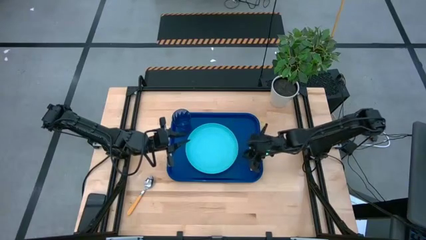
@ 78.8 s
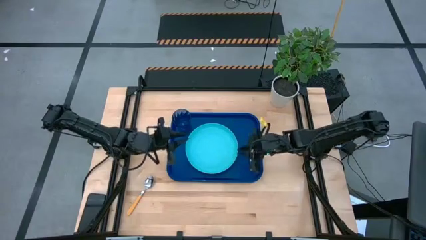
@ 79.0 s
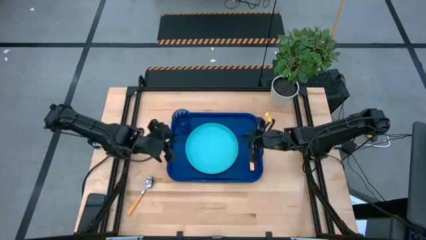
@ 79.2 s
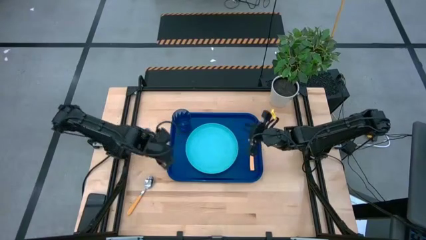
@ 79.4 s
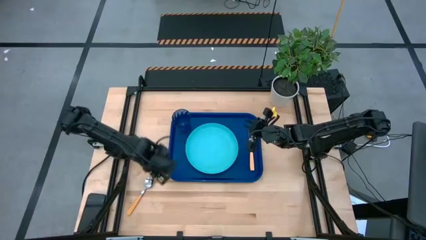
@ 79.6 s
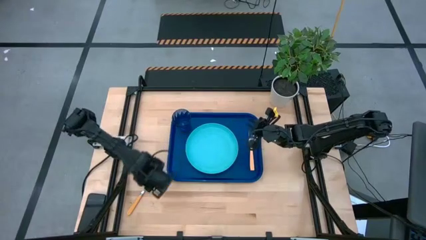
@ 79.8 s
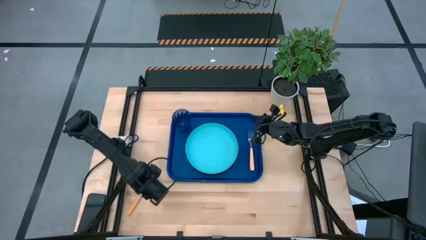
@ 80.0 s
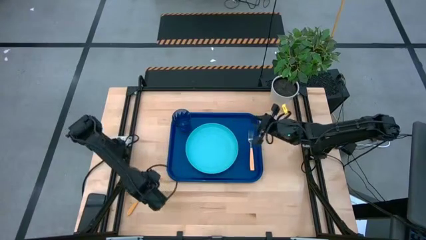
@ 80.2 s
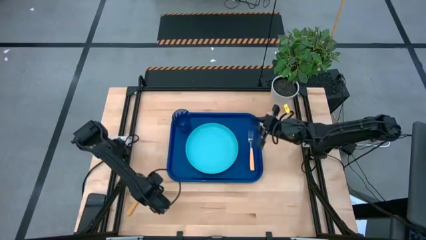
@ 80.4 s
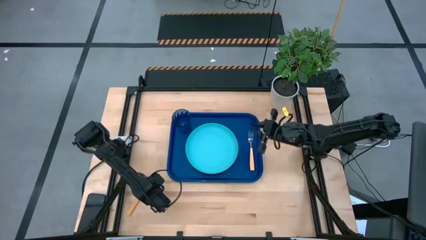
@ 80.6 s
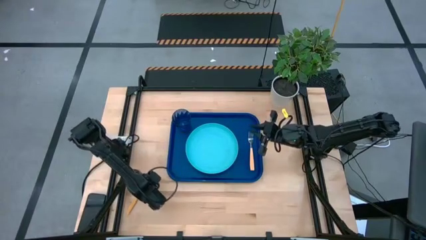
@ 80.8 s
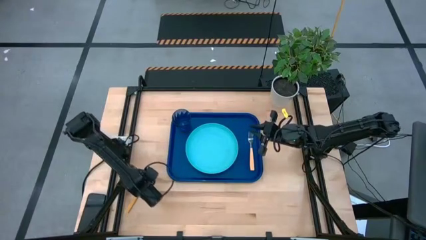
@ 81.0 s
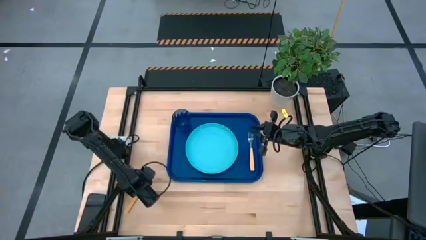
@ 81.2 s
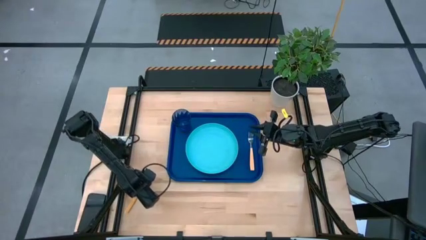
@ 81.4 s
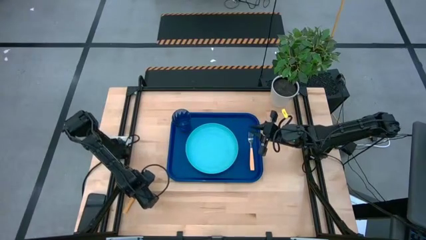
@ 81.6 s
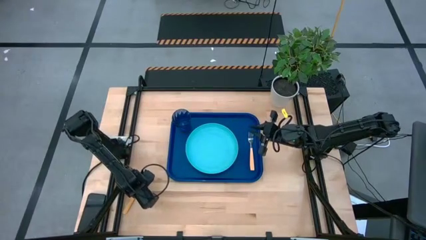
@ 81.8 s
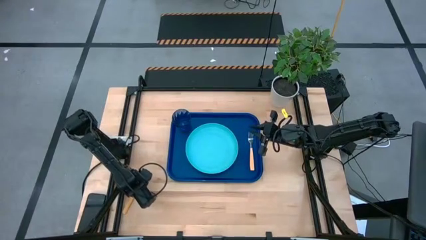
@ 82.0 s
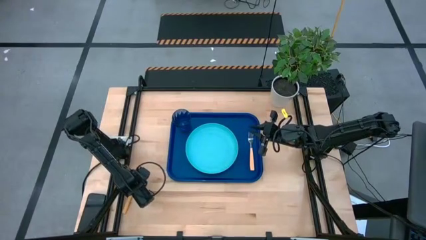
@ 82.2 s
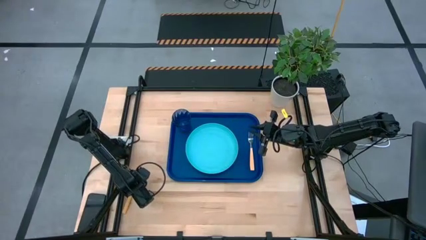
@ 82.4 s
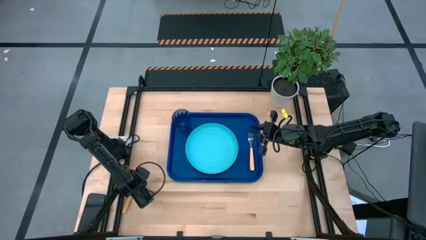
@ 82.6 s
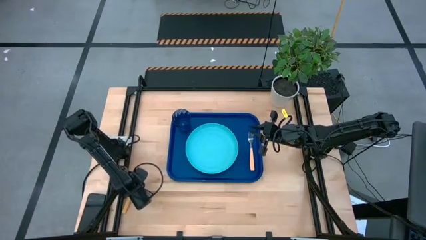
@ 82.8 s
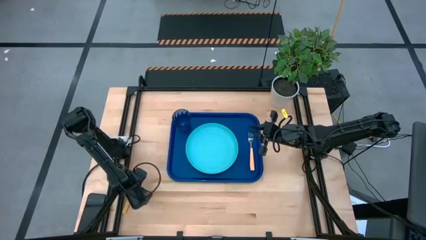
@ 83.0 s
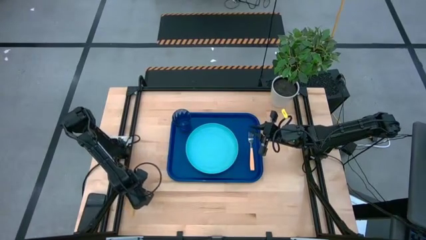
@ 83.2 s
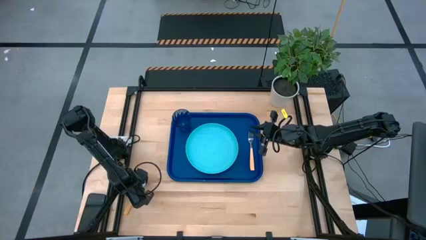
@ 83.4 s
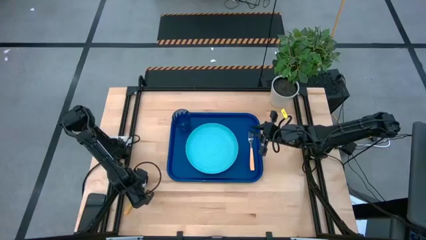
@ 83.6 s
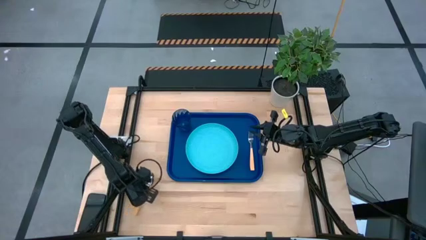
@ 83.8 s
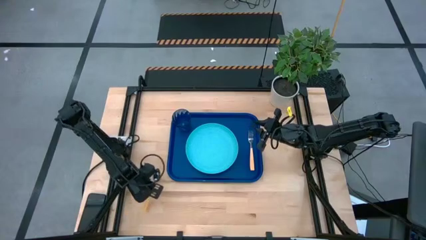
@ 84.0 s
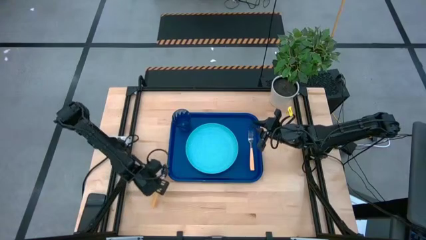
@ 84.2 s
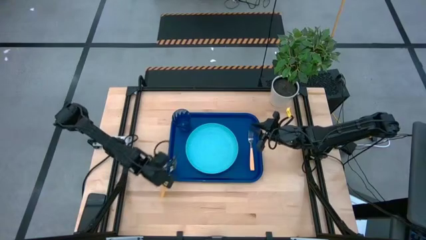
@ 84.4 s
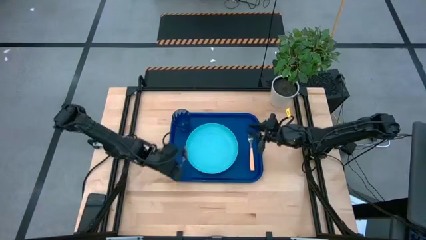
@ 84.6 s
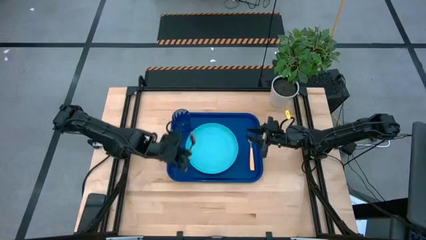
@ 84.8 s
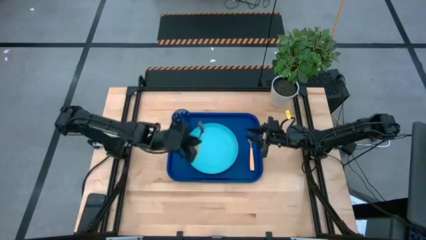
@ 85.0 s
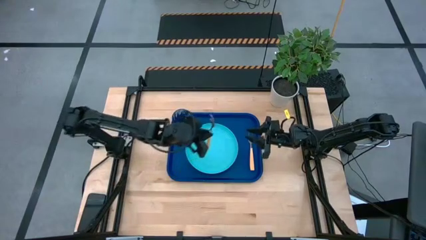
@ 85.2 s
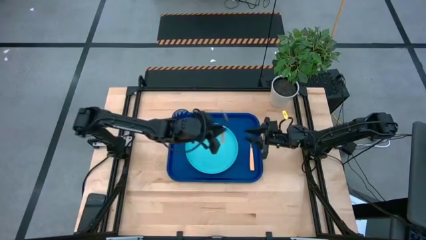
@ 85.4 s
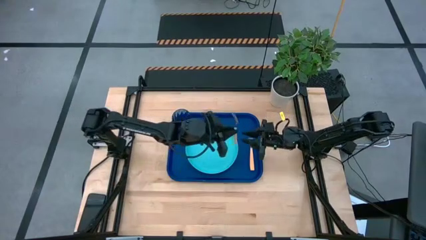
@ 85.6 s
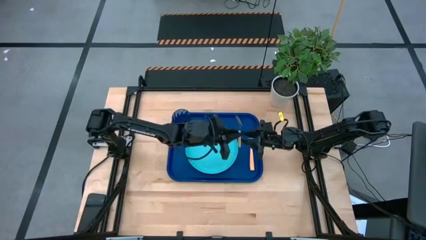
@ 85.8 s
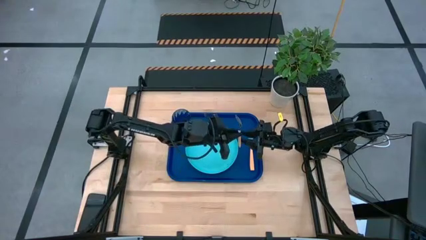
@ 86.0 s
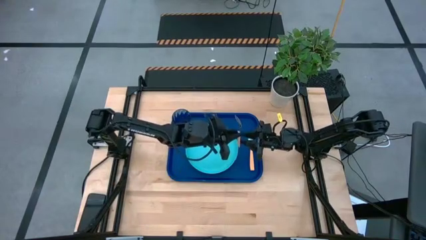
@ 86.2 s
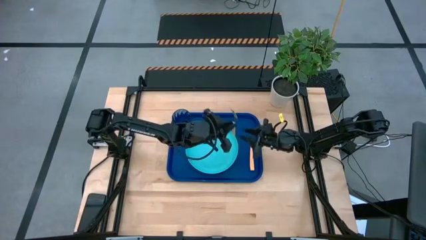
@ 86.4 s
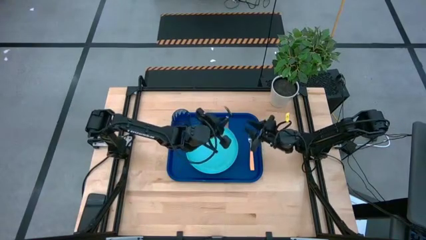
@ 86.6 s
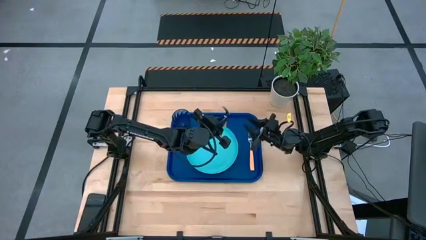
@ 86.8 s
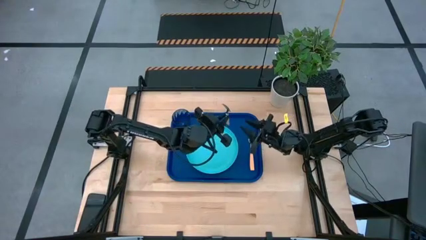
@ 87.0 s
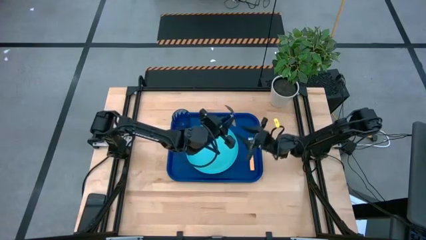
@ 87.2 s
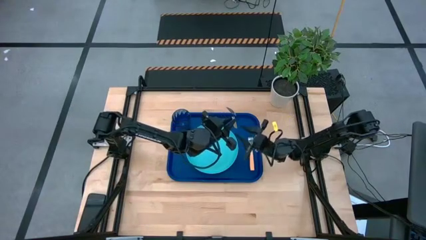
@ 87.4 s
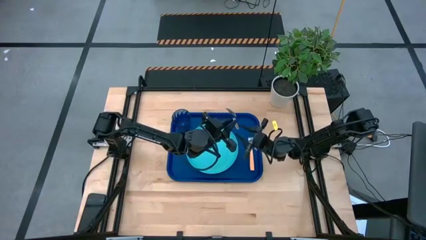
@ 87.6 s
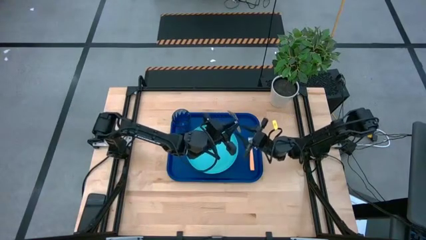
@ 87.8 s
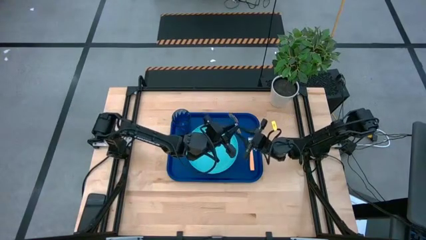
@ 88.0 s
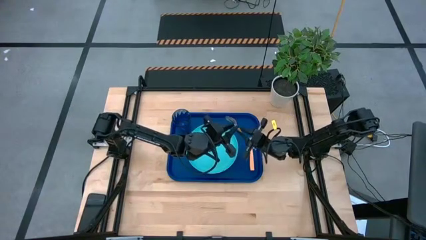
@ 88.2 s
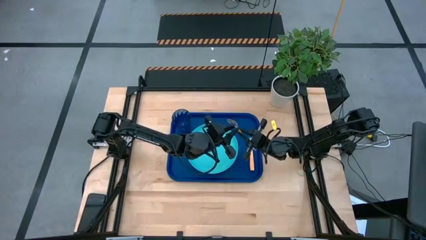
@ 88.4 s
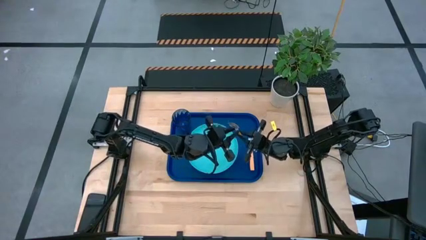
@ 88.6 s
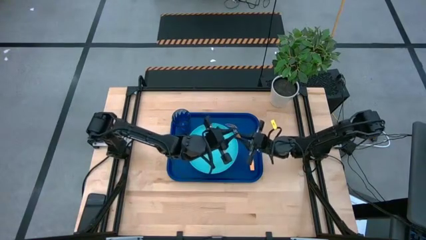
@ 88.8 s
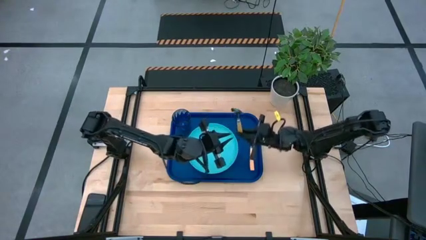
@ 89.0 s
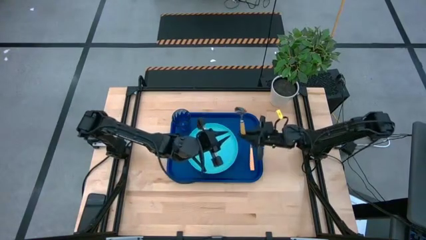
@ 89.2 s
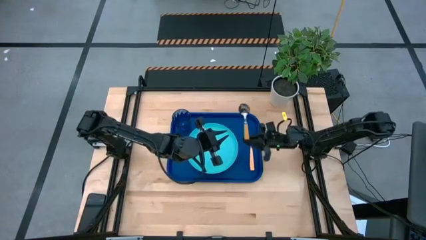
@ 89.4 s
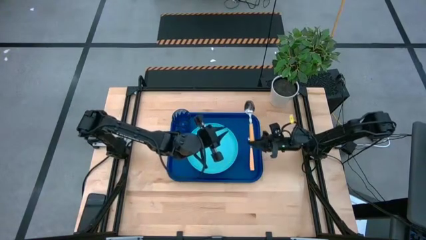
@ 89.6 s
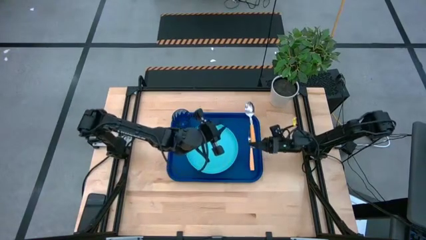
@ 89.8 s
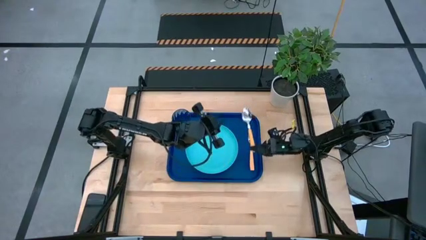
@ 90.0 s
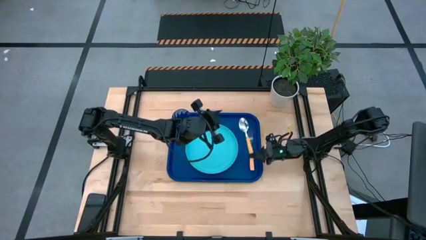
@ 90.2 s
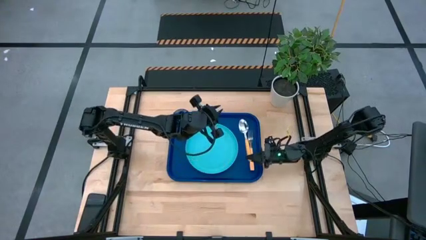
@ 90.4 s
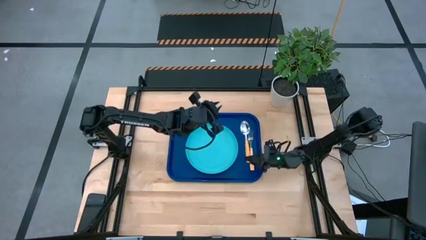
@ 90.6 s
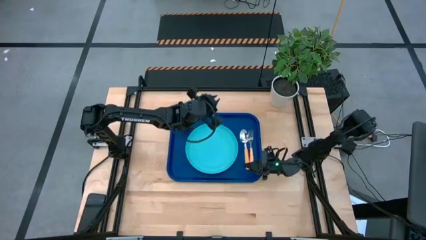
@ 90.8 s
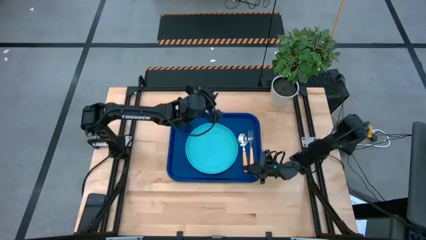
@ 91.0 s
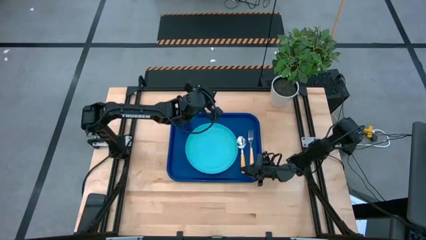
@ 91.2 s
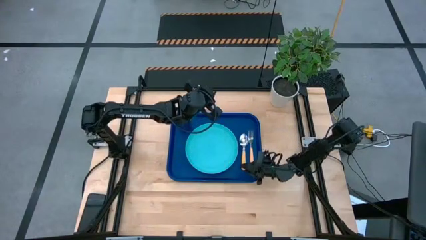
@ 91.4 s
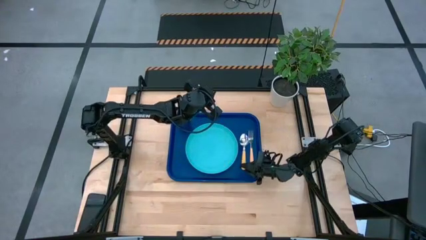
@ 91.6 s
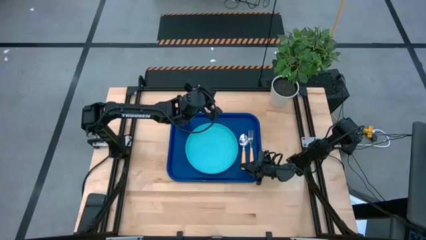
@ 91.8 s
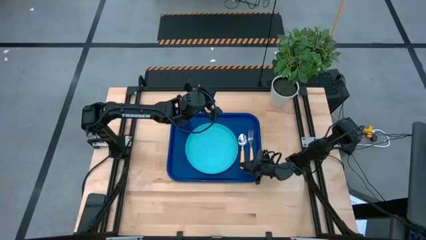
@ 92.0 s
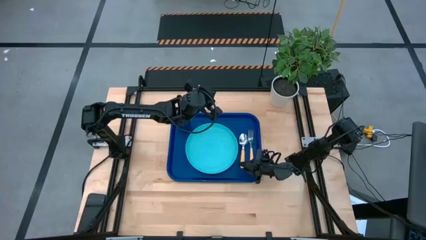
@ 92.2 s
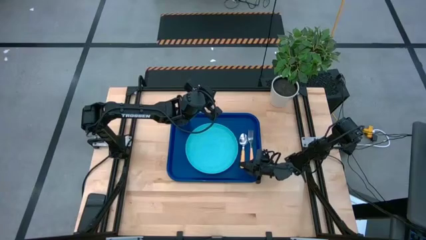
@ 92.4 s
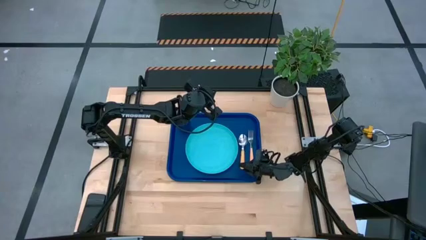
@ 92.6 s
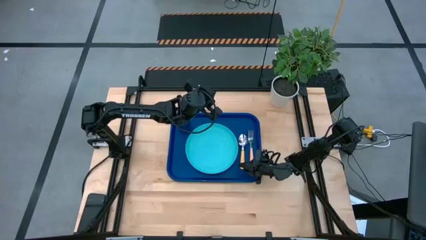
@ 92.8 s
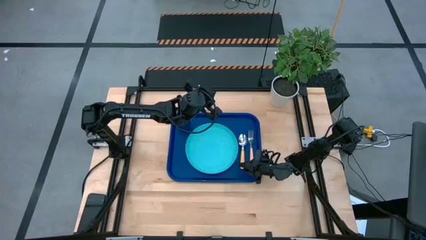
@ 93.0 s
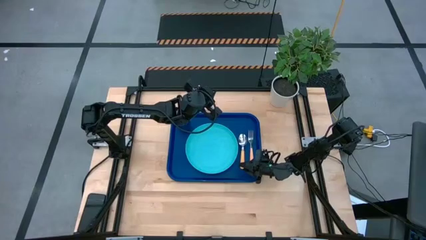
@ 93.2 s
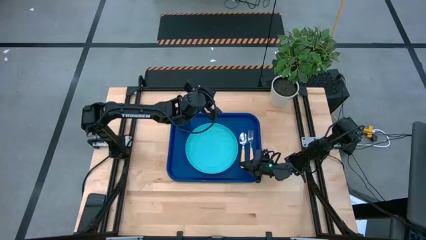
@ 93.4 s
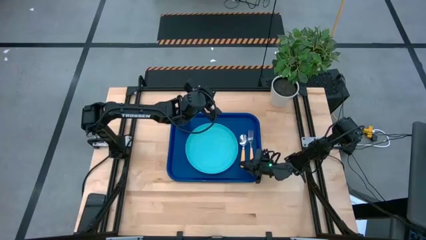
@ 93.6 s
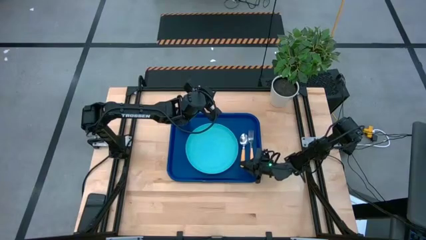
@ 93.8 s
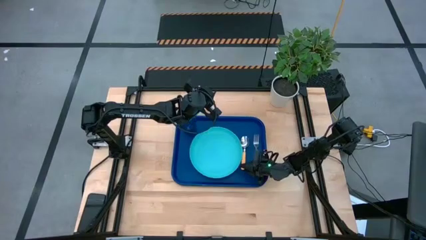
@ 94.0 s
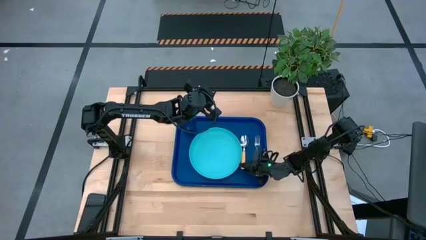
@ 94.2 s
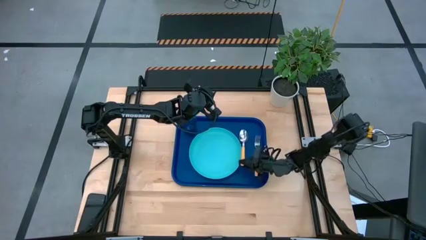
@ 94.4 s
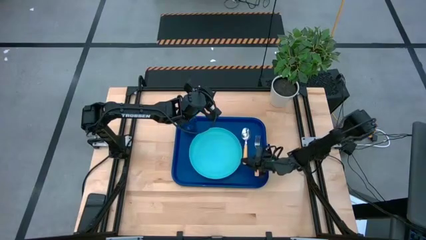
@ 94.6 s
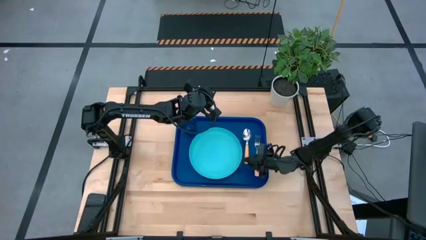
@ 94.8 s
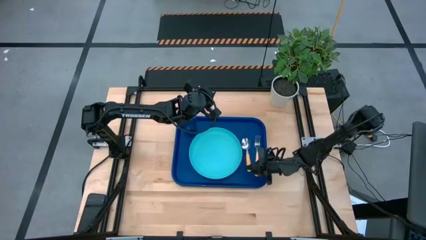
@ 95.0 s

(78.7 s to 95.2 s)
Task: Pick and place plate/cup/fork/spoon on tray
Put the yellow spoon in the middle of the orange fork and light blue plate
